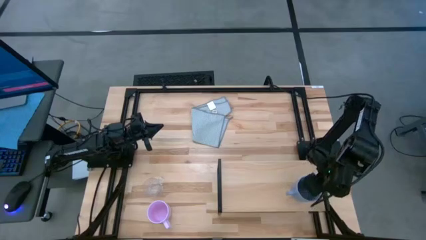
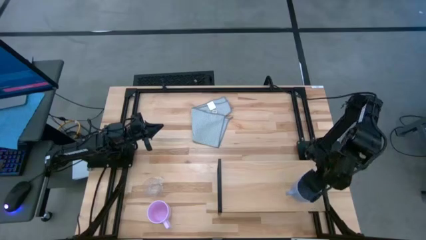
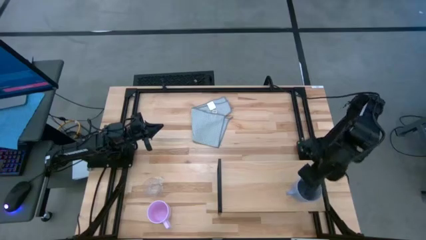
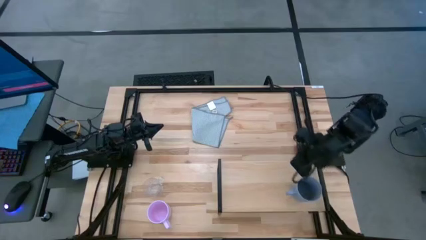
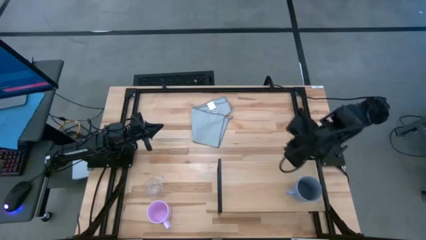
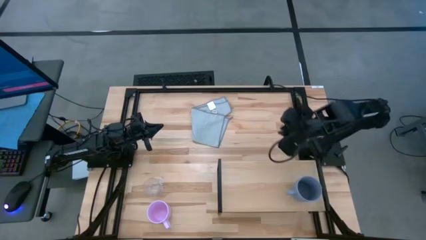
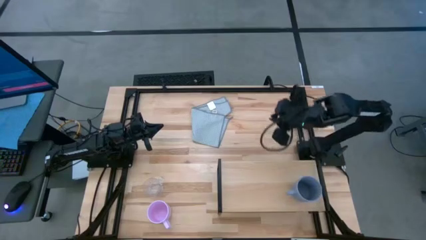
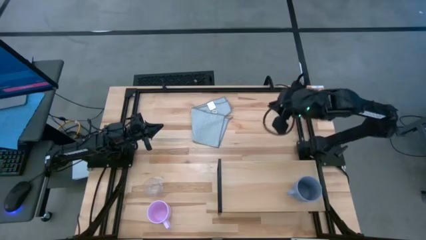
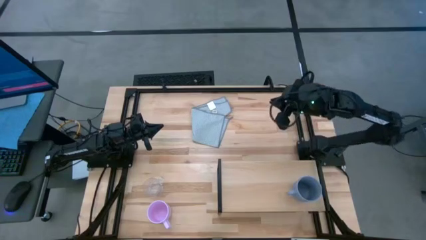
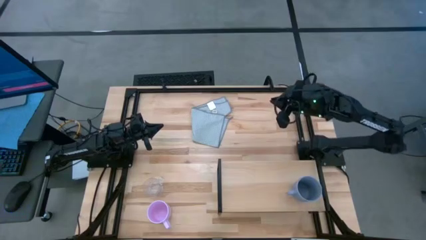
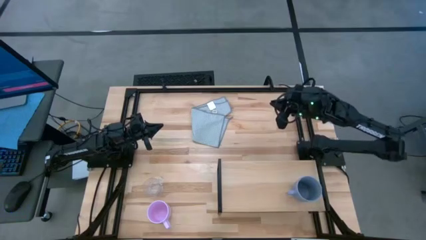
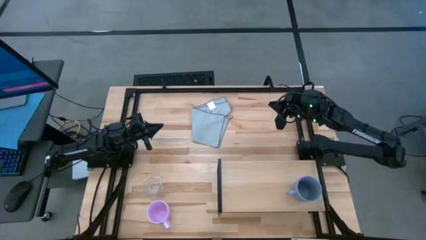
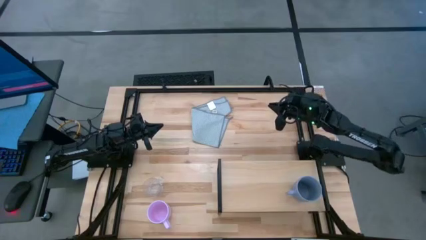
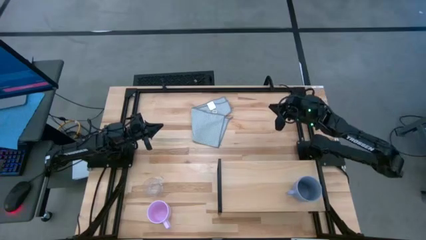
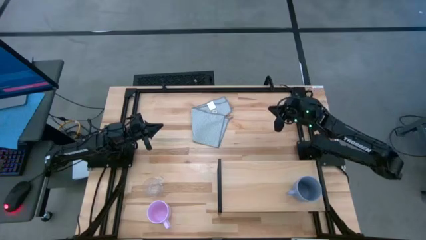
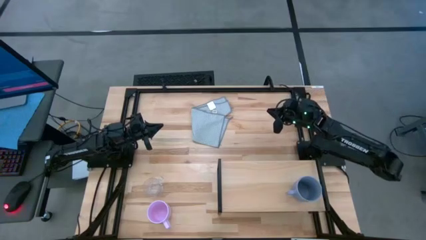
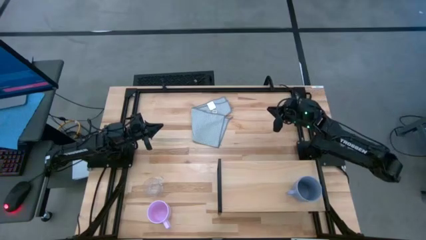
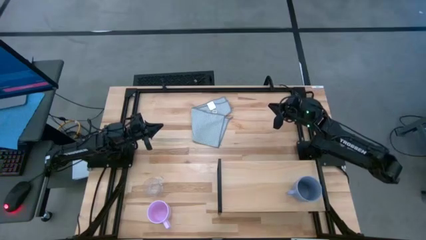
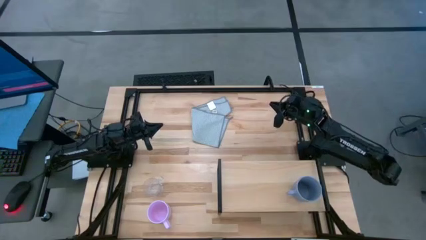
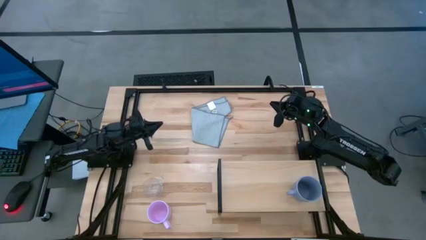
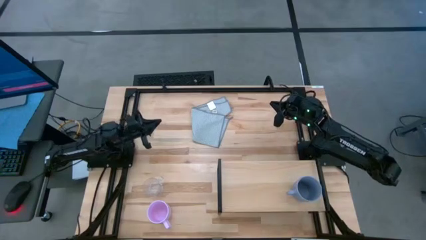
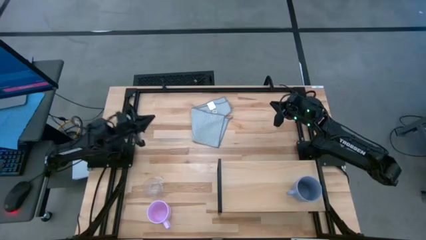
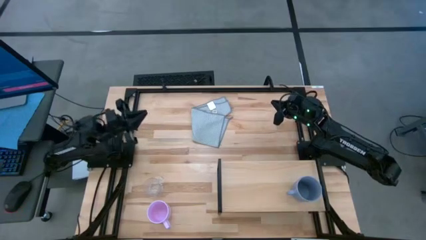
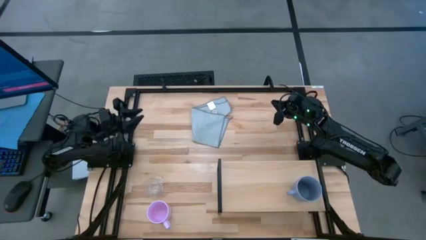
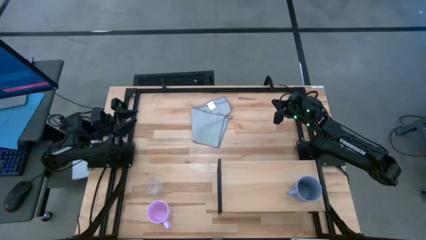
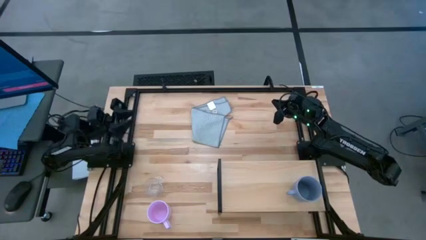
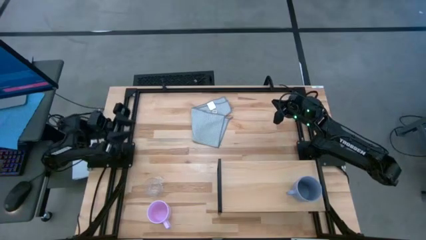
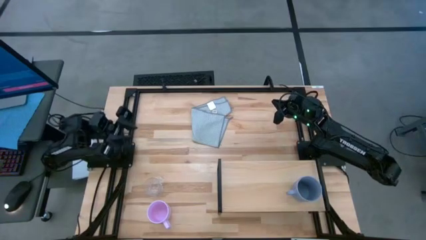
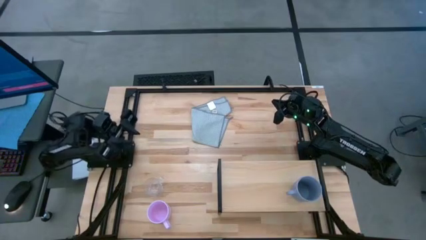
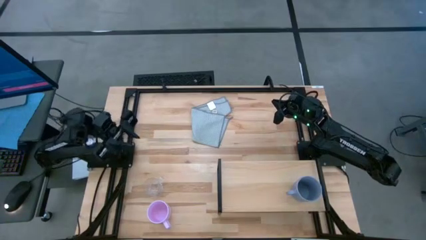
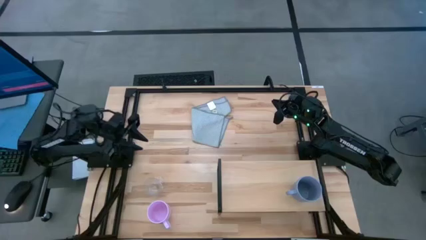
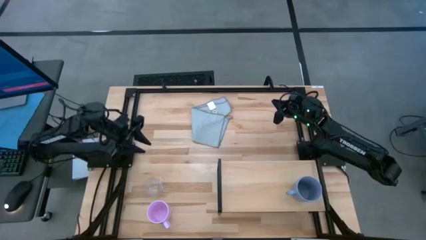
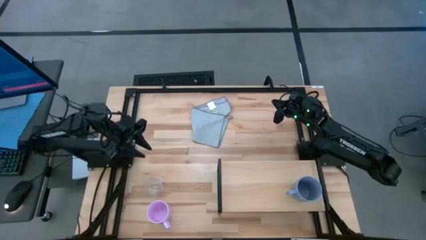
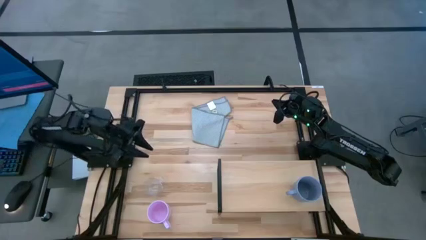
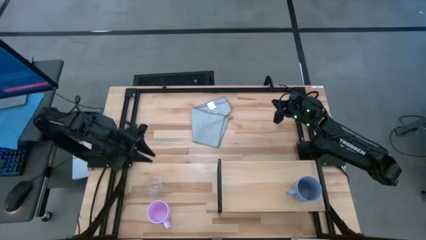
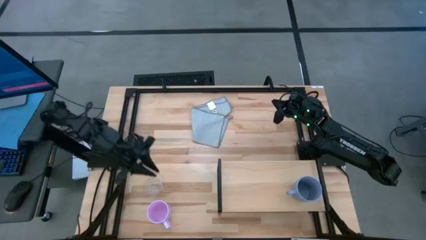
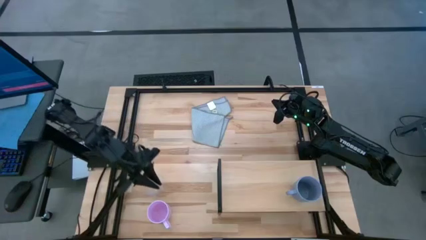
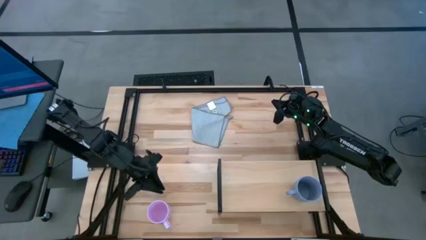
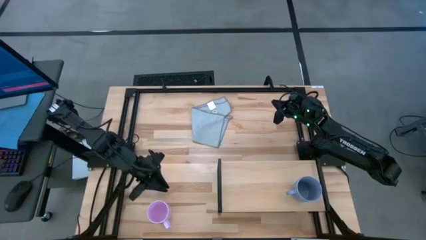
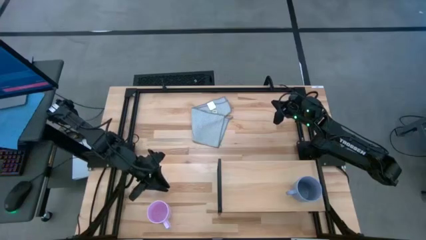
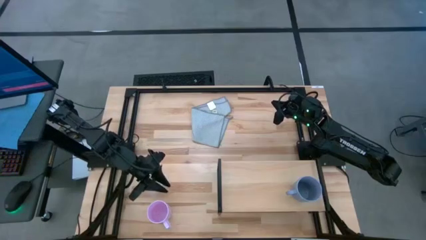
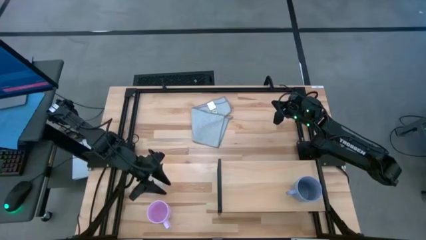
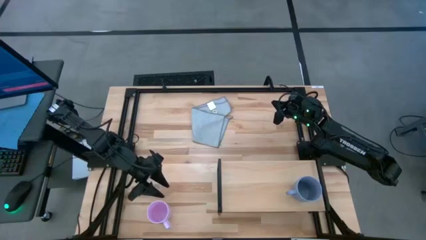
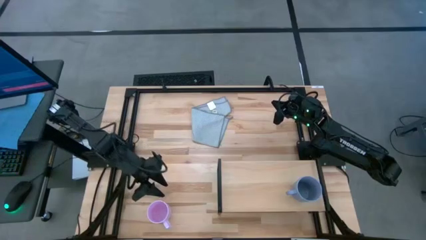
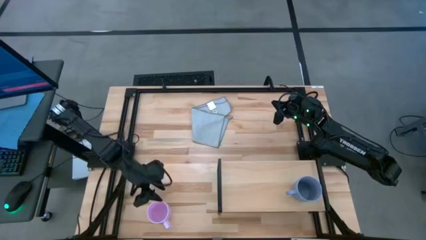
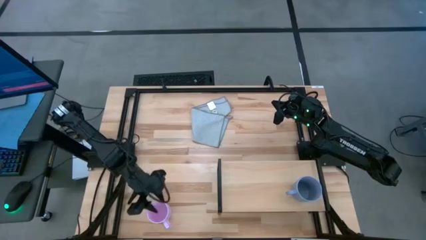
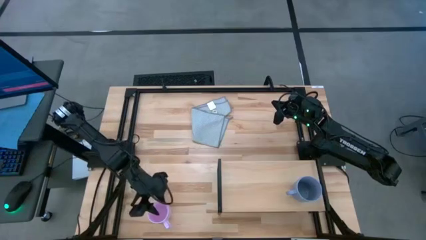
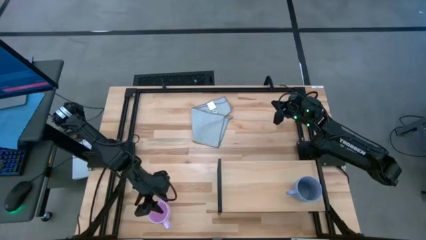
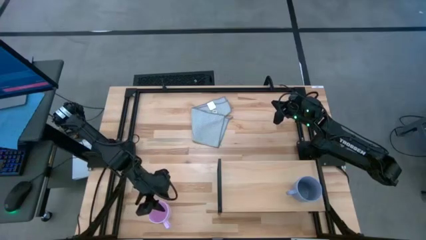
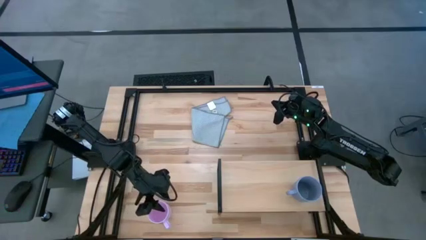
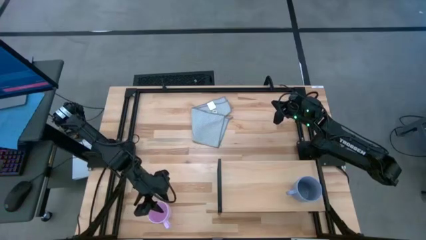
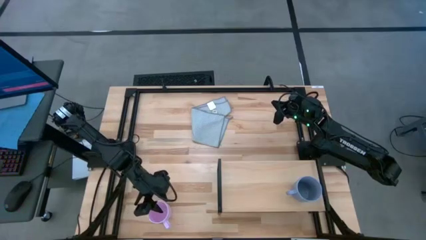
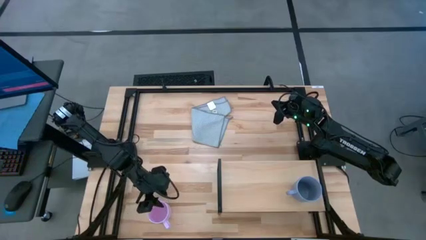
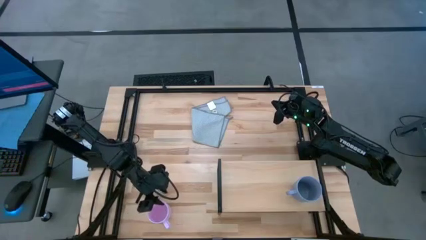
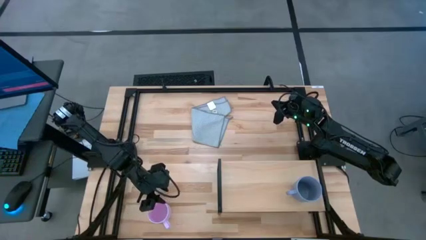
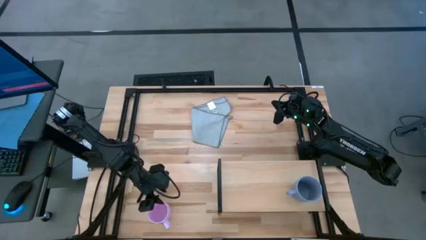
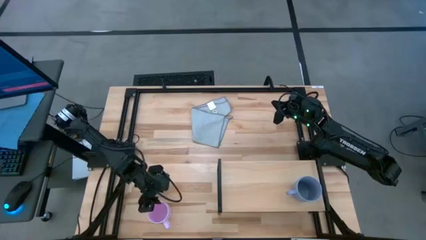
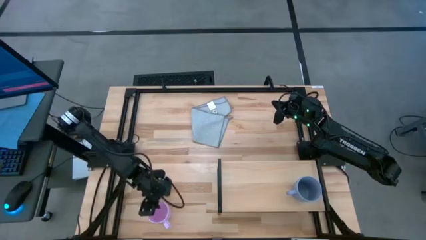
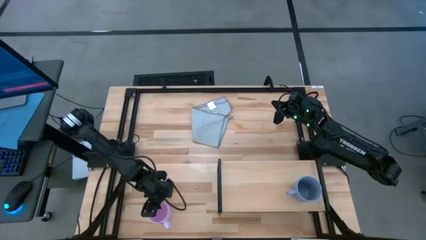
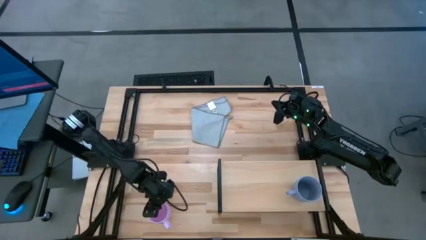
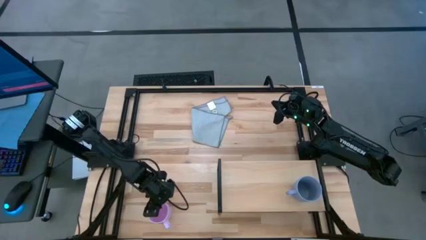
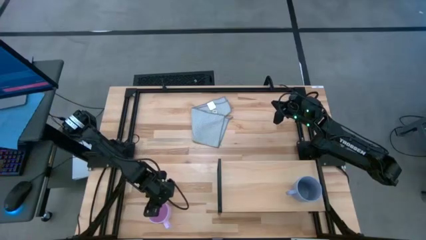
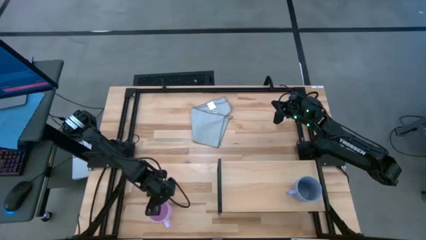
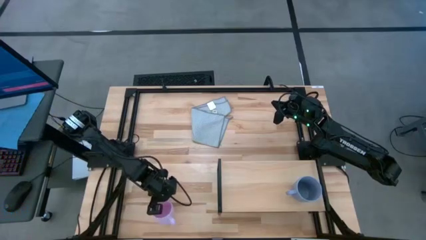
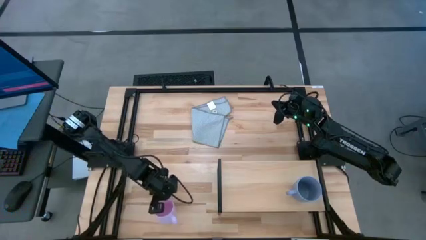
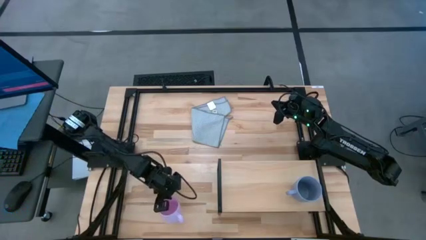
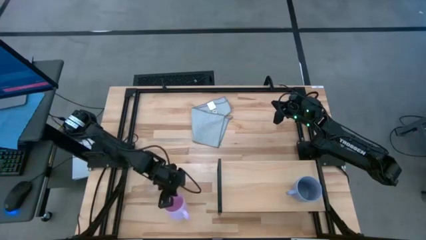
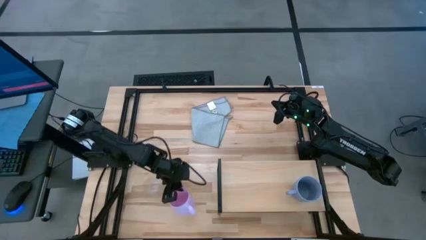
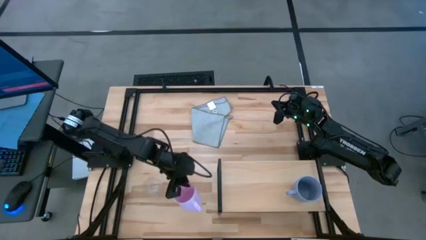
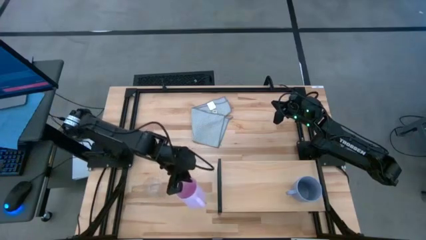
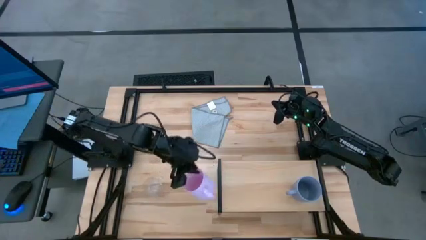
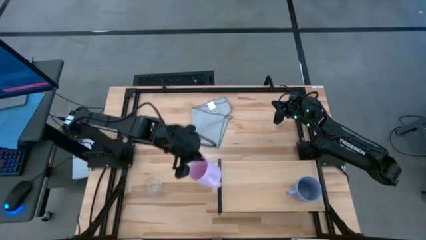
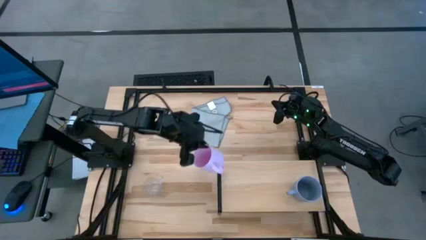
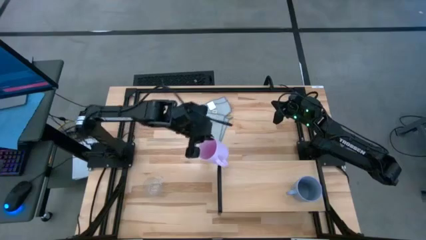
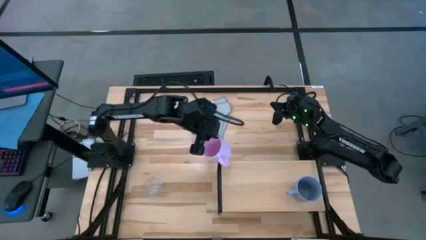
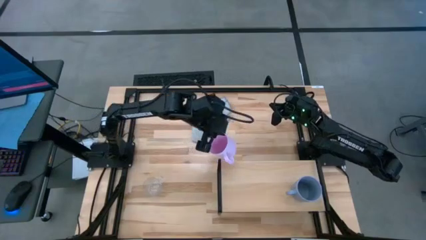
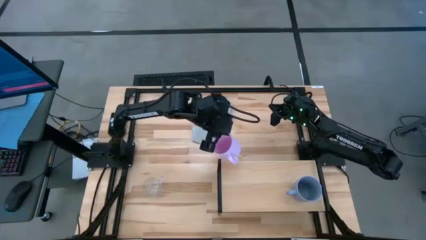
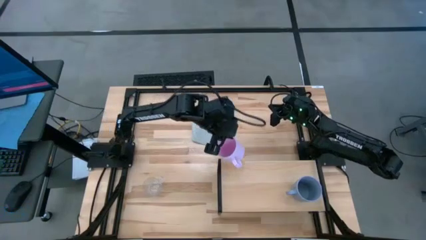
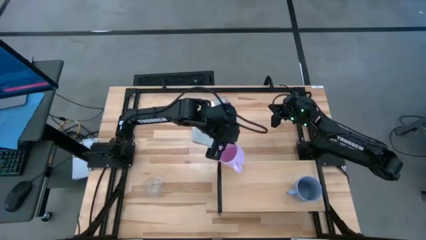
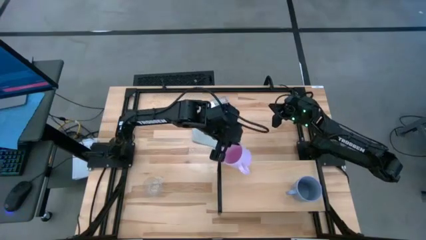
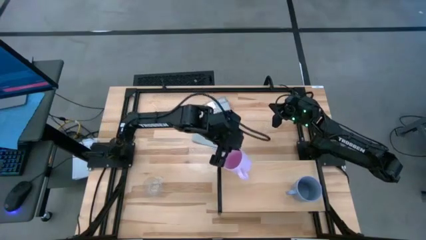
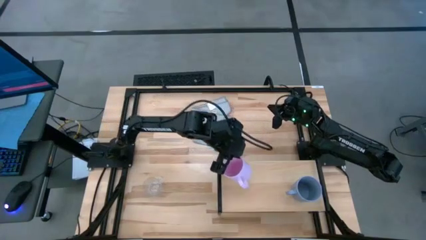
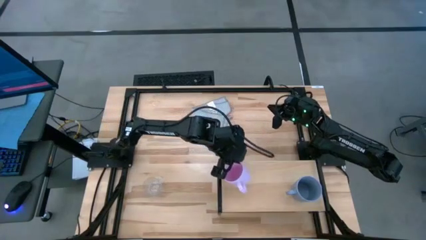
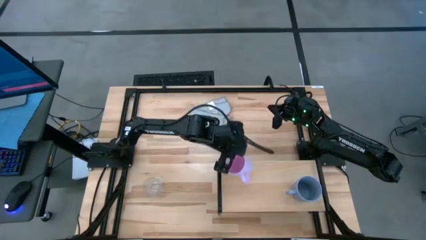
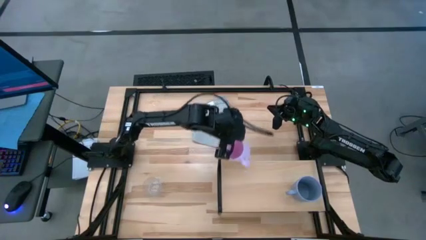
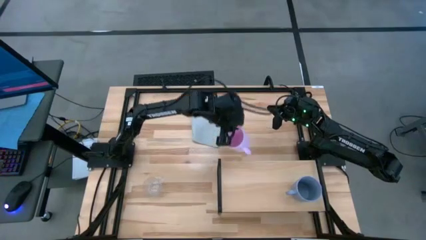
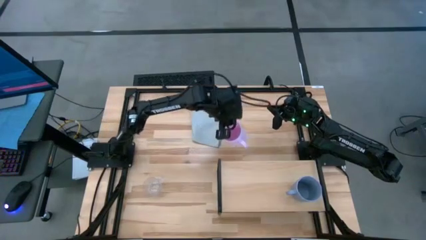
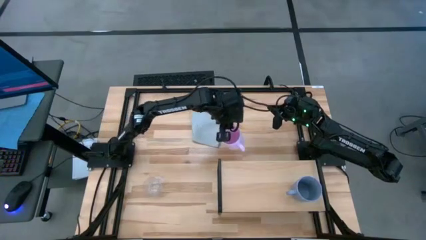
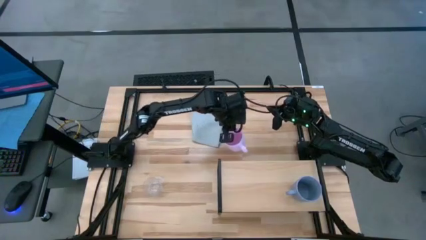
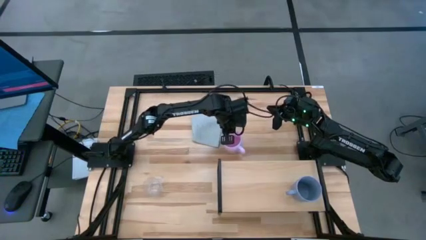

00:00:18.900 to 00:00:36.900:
Task: Stack small to large cups/mugs on shelf
Put the pink mug on the shelf
